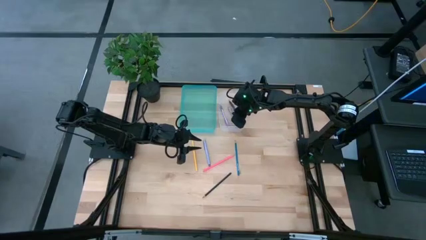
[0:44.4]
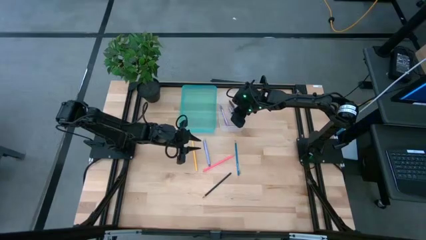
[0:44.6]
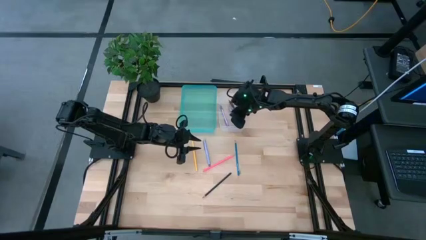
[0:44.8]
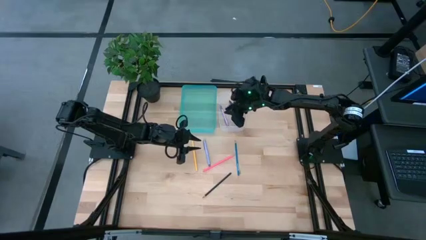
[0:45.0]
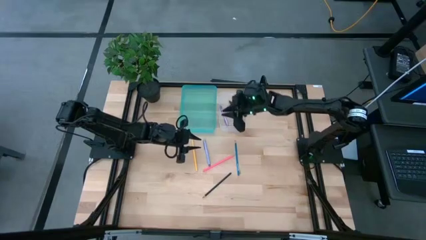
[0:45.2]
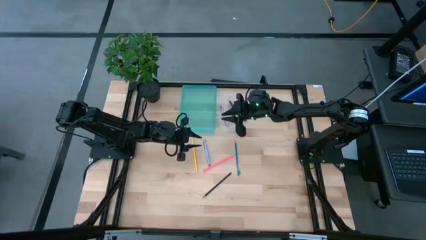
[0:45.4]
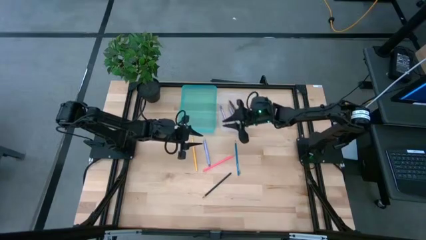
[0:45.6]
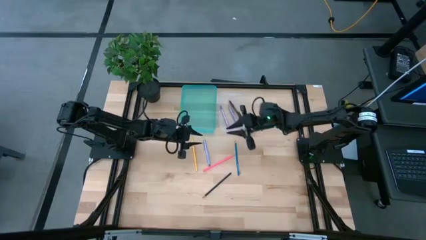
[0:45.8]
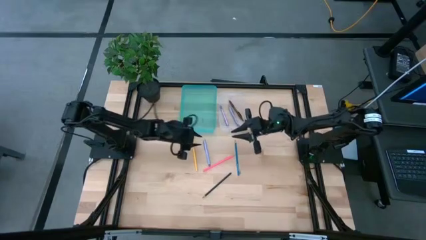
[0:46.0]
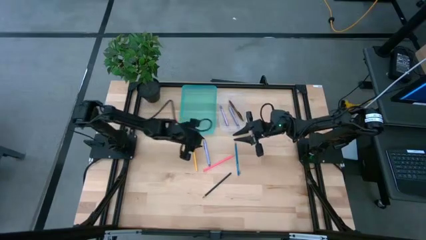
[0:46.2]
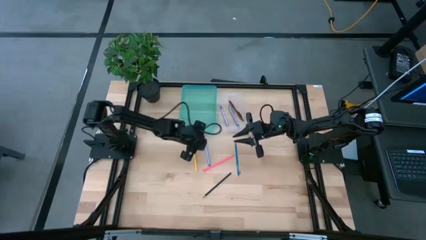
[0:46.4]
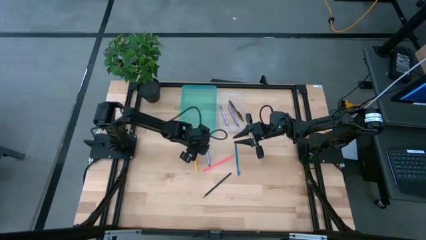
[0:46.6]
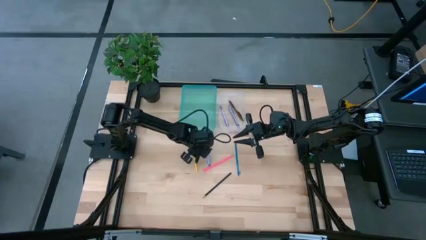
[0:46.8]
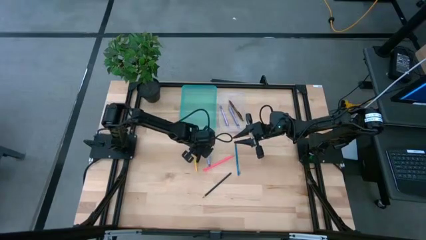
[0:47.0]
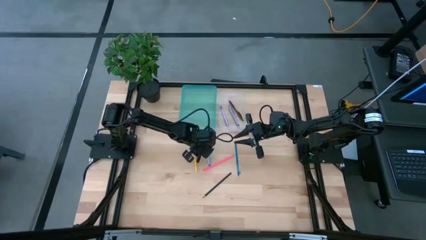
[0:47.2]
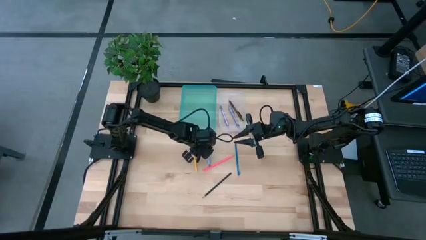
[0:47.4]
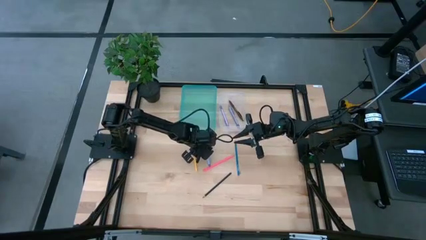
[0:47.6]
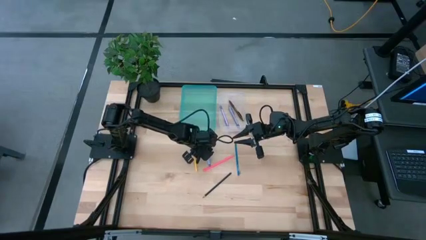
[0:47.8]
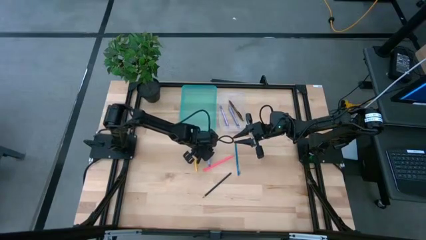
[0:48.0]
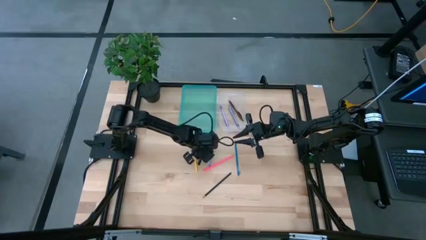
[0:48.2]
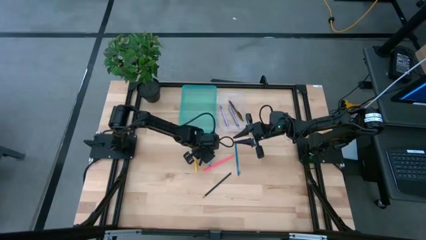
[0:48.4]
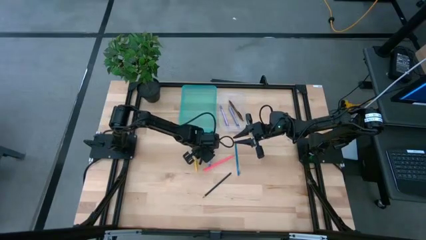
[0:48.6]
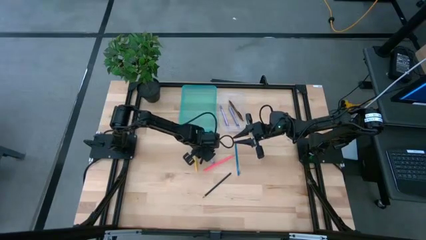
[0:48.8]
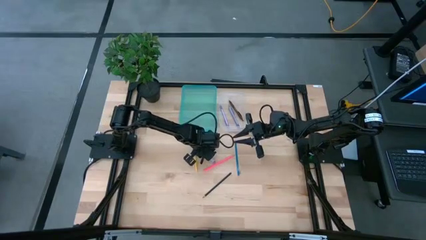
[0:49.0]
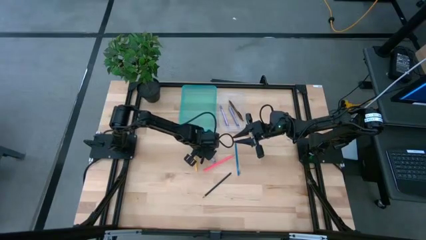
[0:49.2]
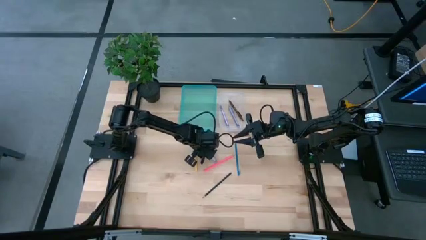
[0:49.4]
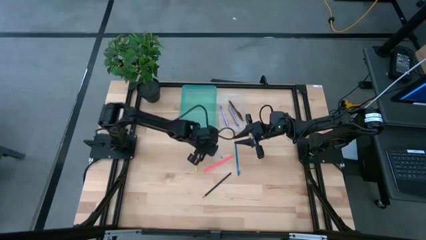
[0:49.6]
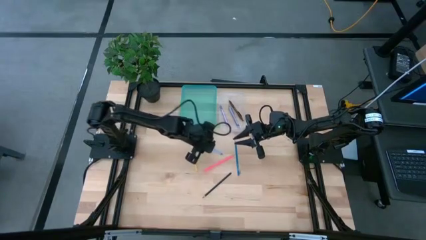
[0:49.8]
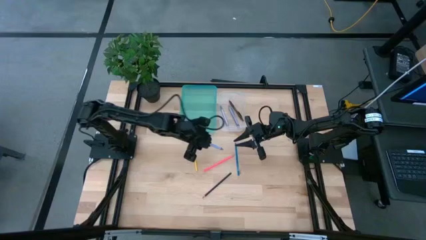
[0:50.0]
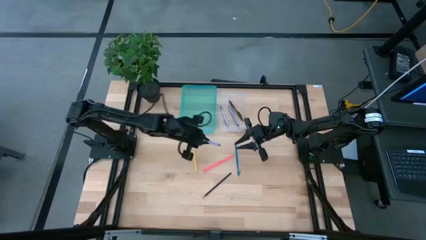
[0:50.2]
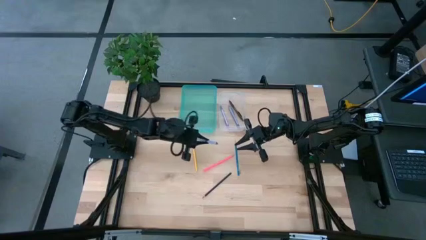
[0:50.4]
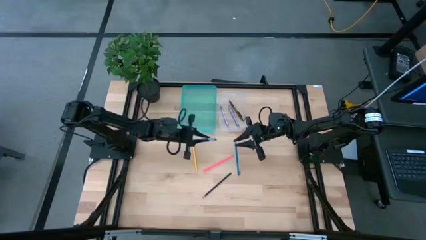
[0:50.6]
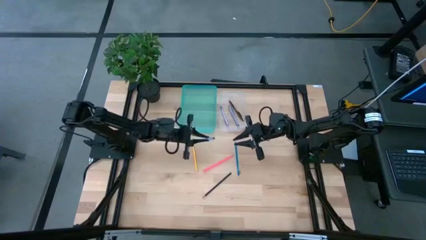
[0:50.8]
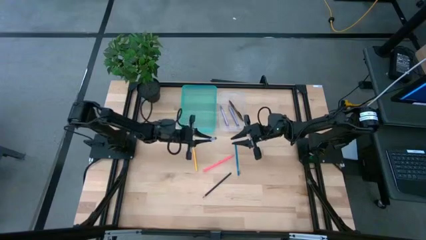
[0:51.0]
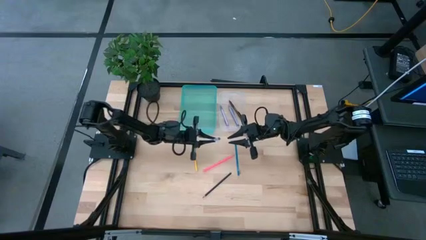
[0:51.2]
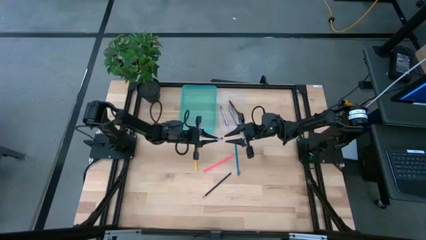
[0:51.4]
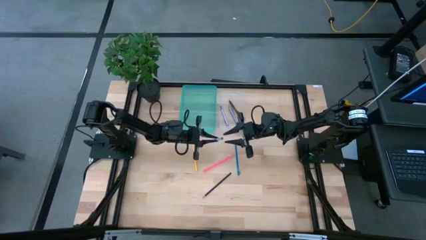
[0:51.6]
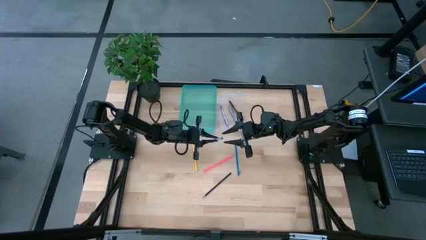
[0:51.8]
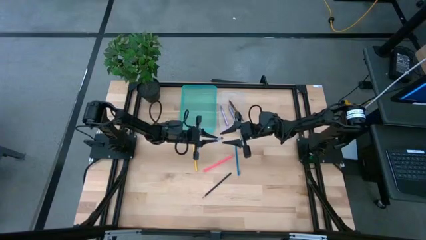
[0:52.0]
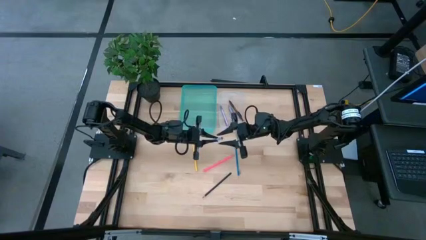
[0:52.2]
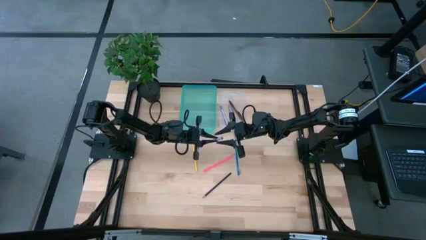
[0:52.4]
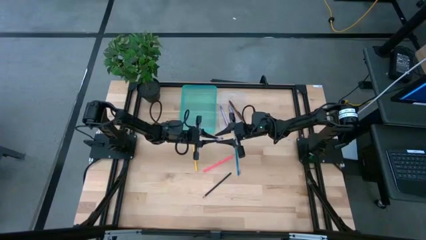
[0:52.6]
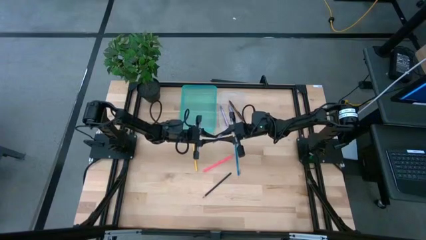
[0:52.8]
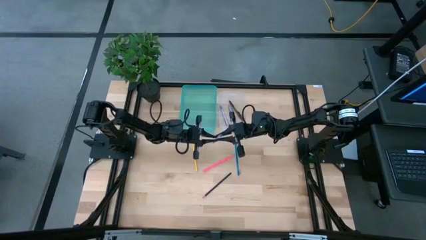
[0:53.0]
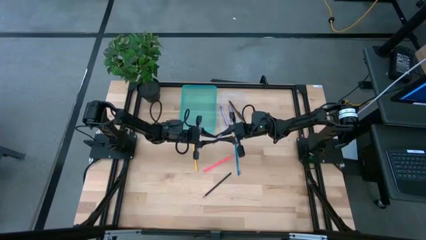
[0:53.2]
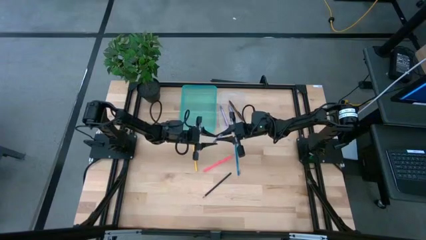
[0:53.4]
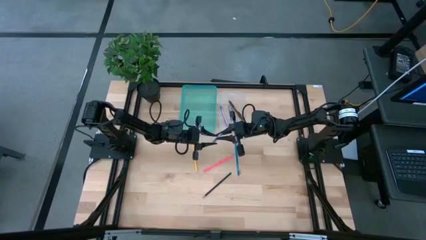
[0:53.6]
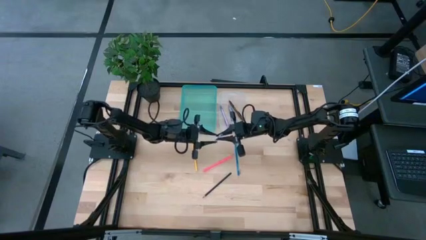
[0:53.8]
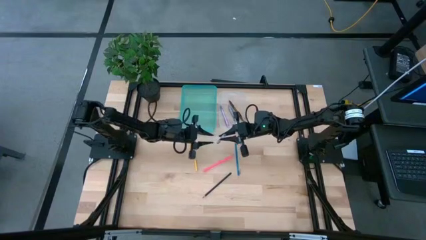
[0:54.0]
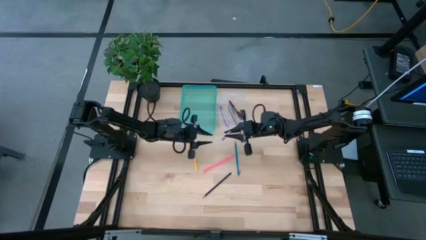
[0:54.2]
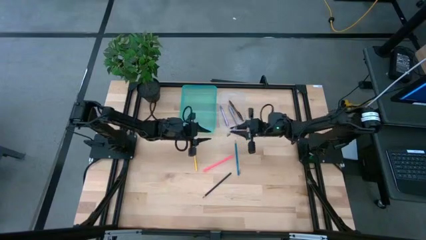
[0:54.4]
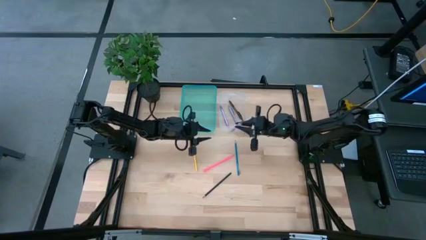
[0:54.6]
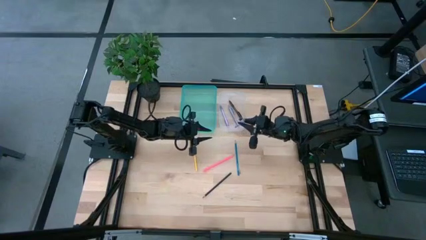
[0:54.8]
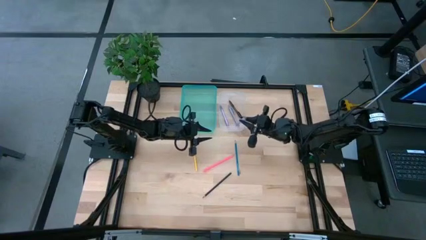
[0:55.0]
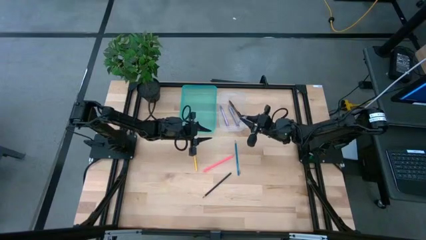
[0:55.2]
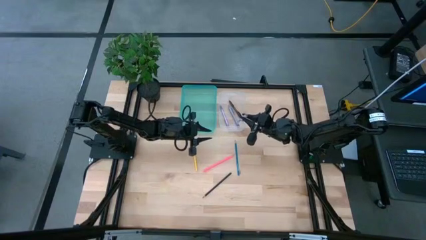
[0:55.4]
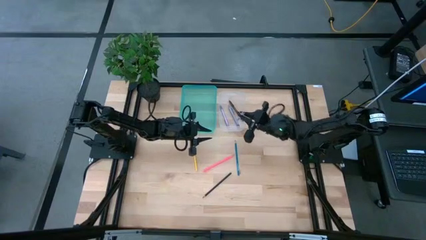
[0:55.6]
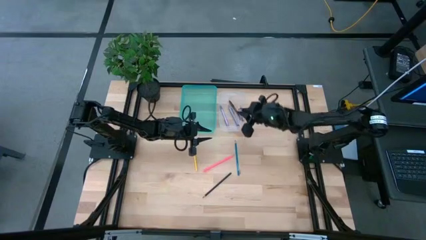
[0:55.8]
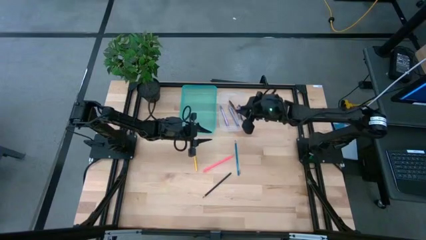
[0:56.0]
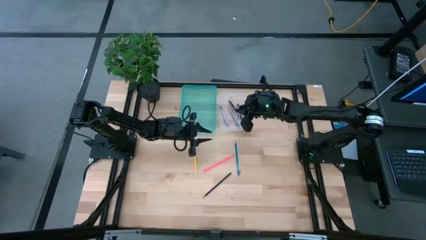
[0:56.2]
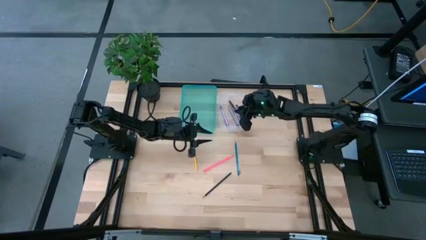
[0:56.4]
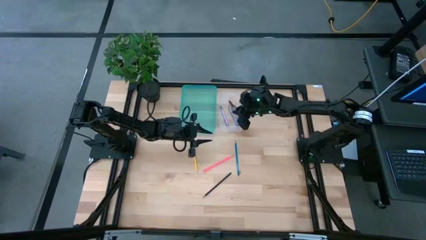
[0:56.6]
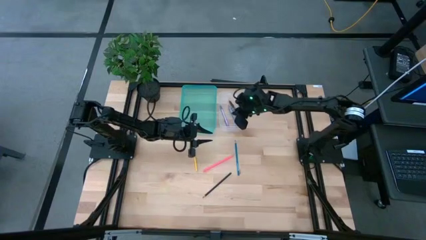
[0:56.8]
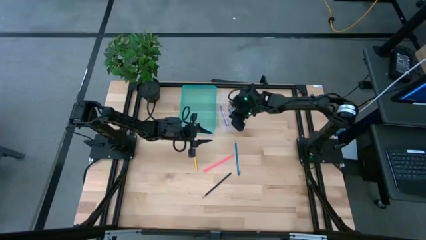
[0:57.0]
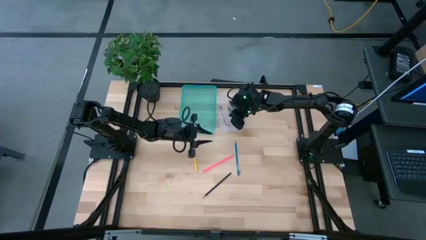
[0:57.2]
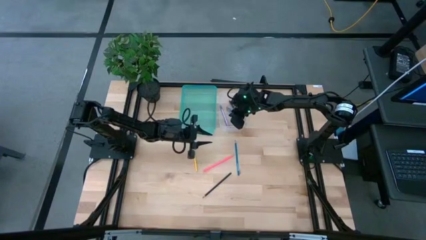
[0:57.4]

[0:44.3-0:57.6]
Task: Sort pens & pencils
Put the purple pen into the transparent bin
